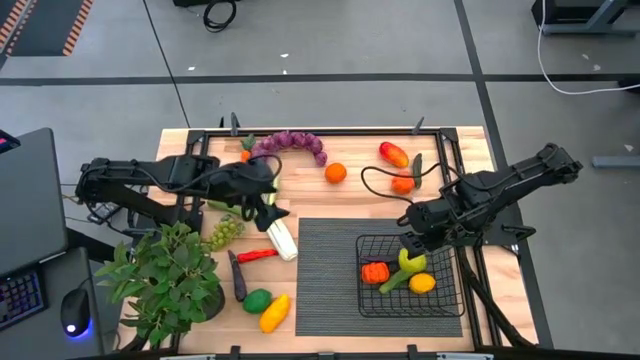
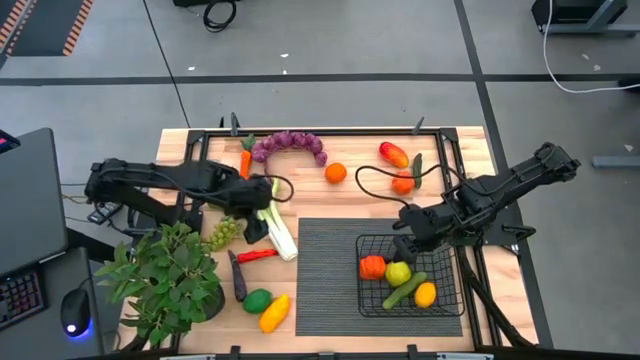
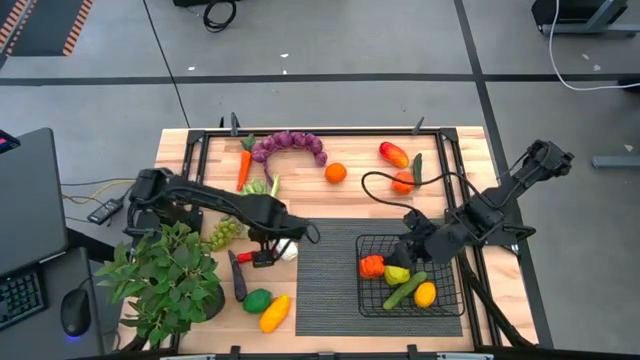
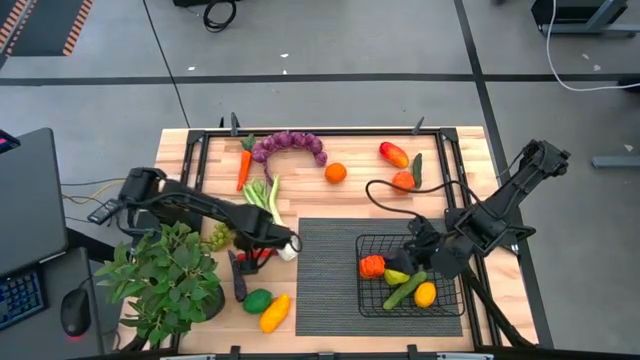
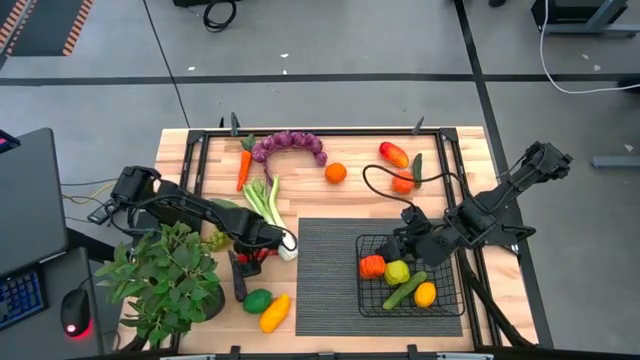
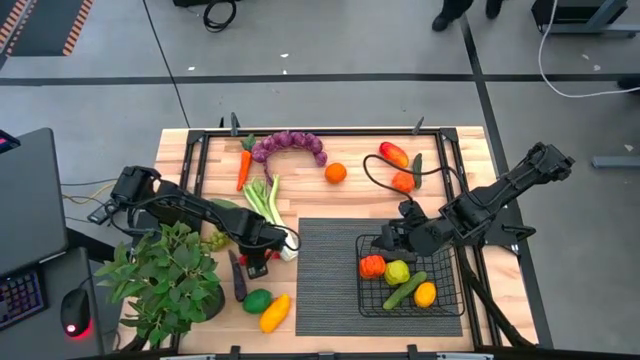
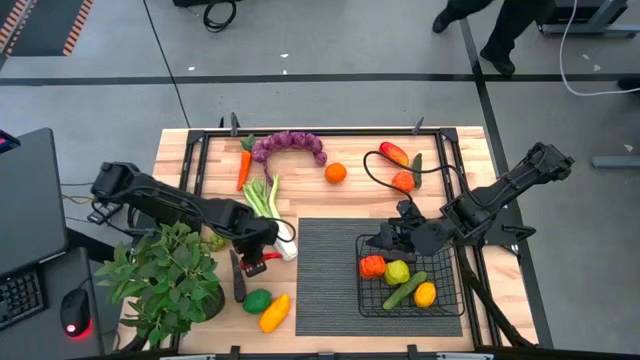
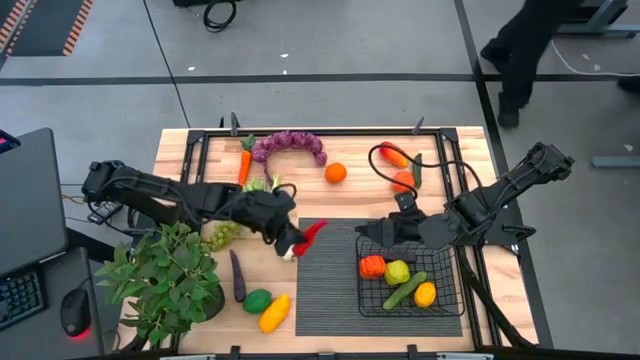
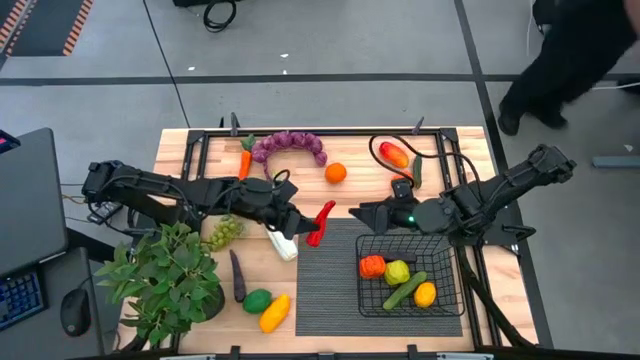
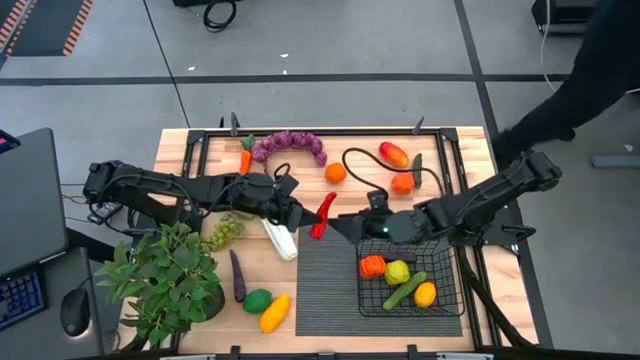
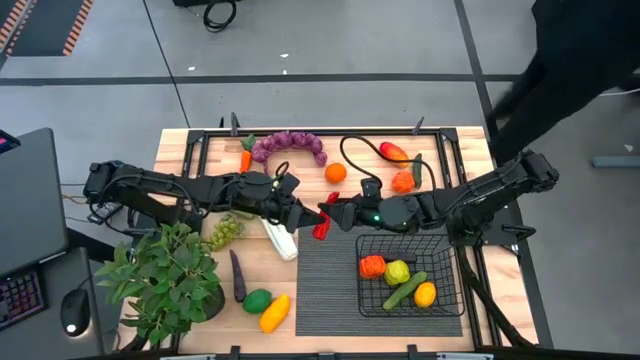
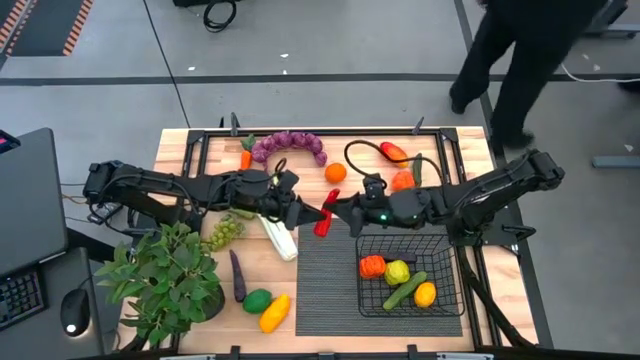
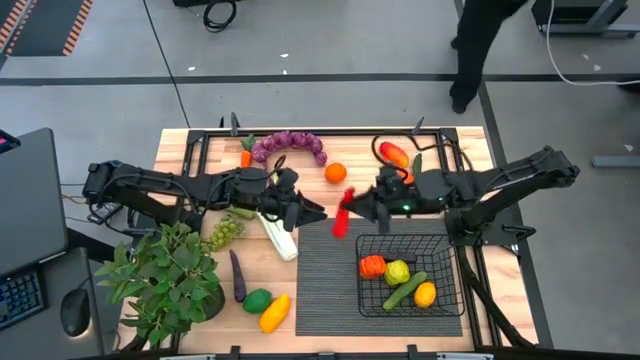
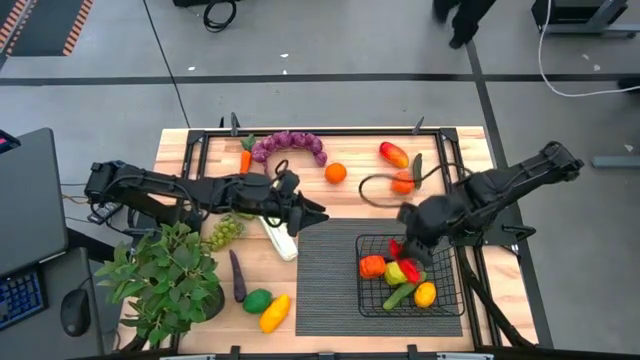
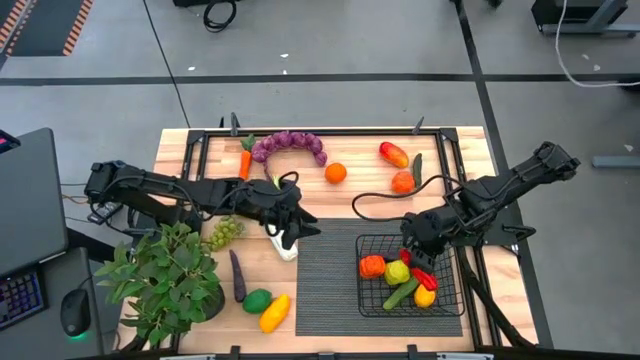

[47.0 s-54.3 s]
Task: Build produce basket
Put the red chili pepper into the wire basket

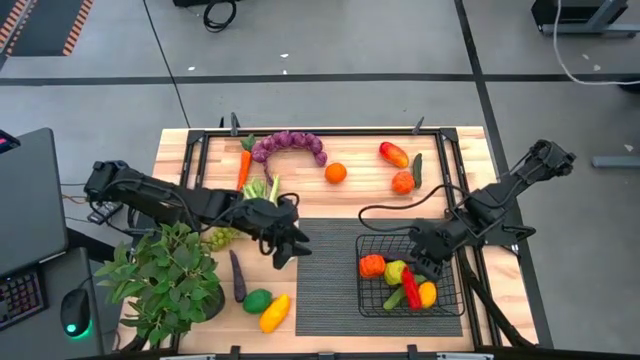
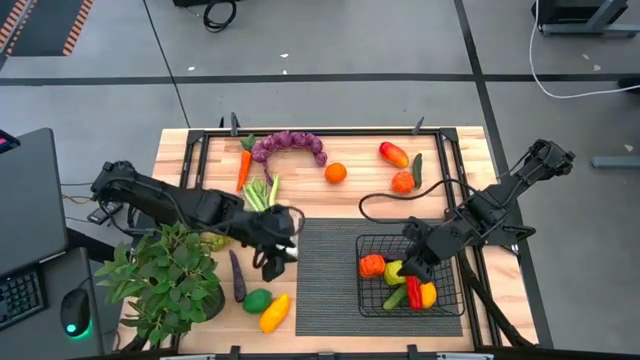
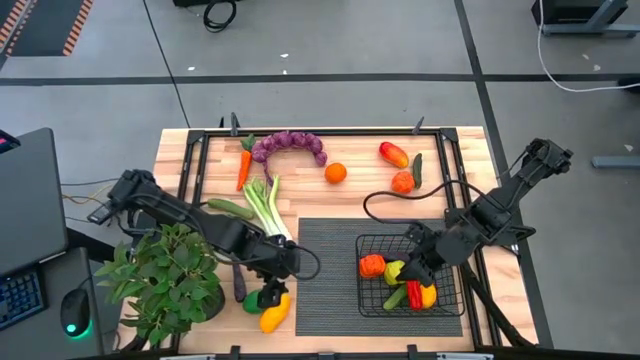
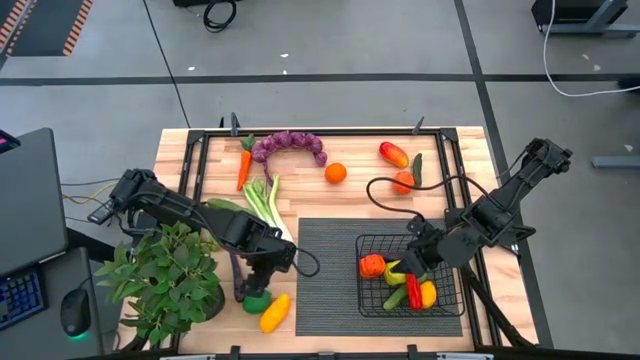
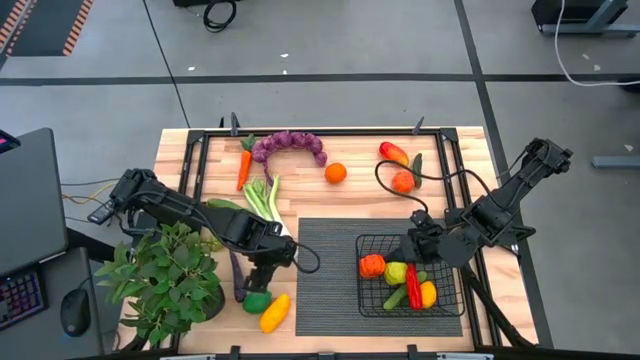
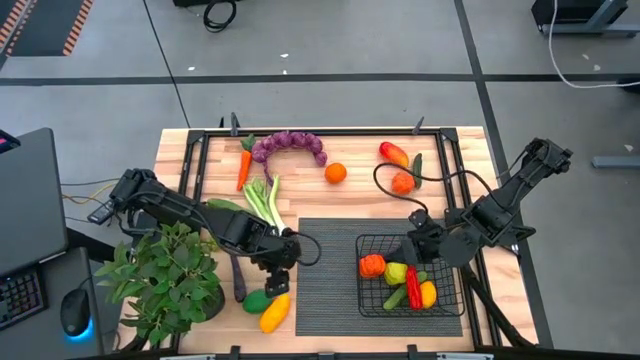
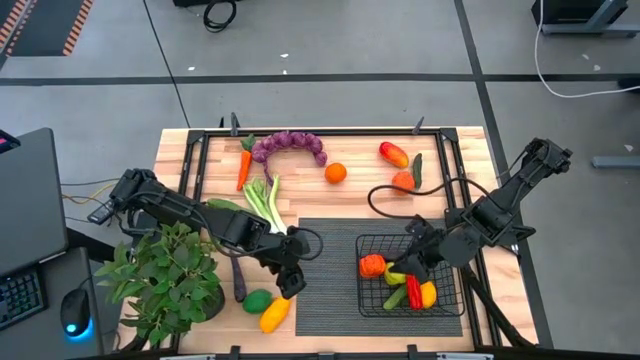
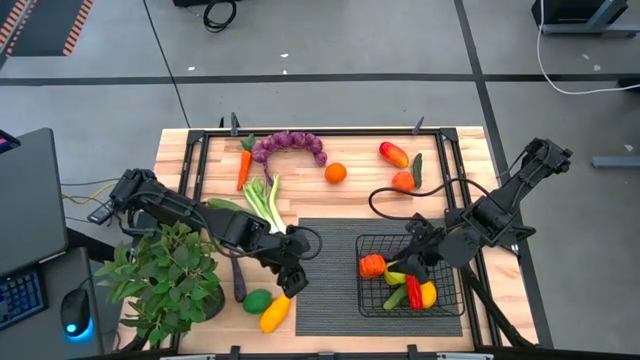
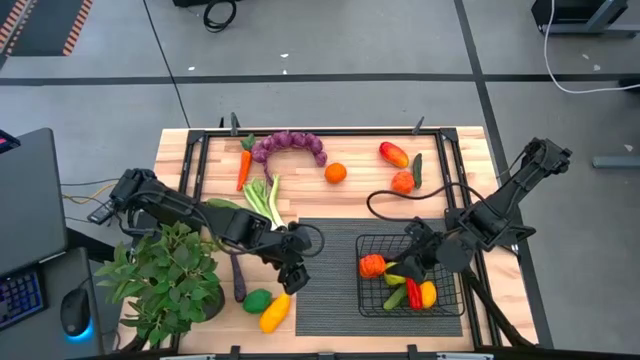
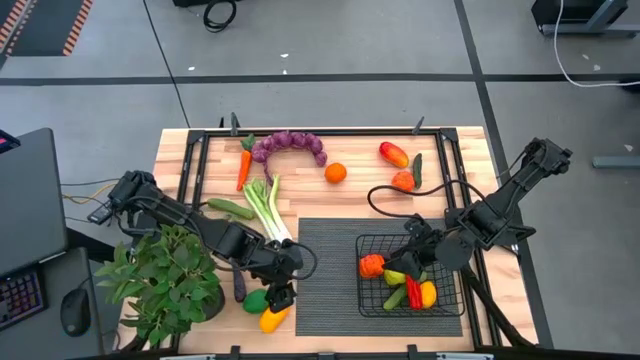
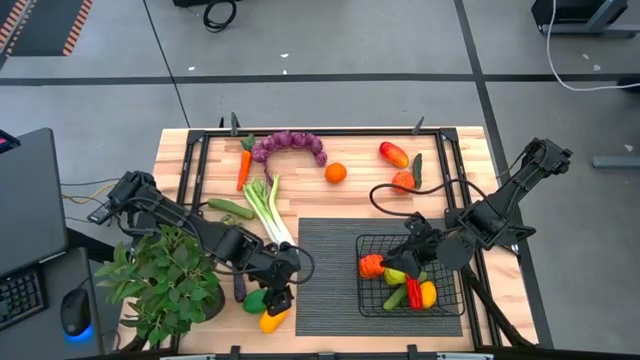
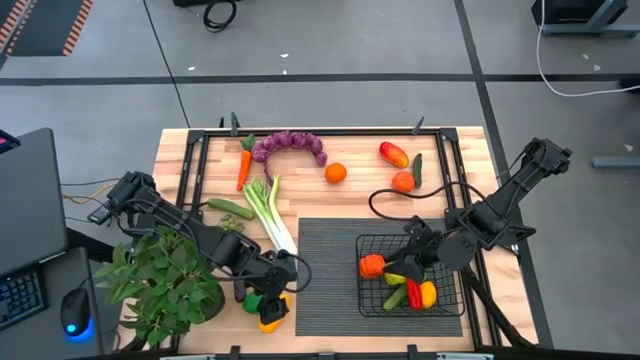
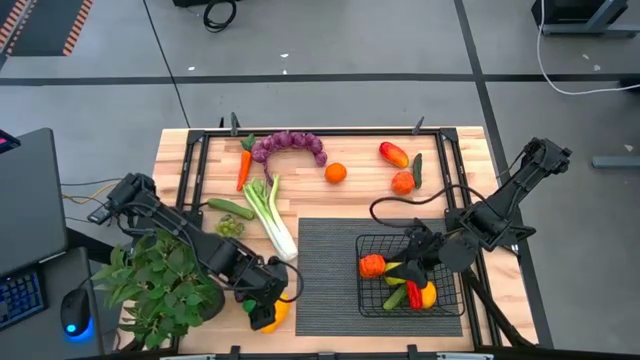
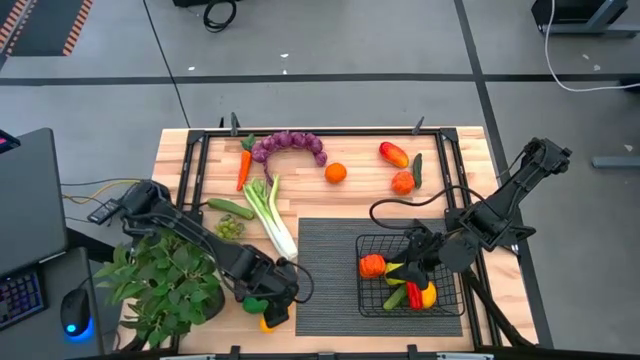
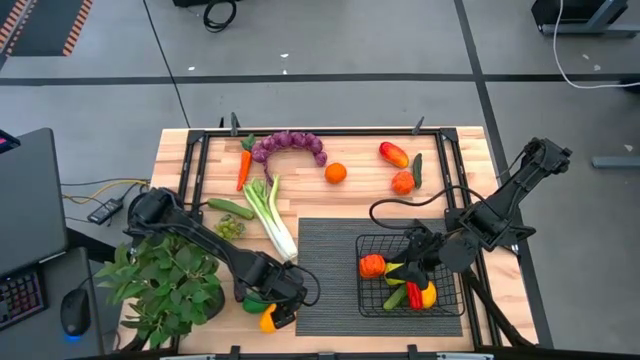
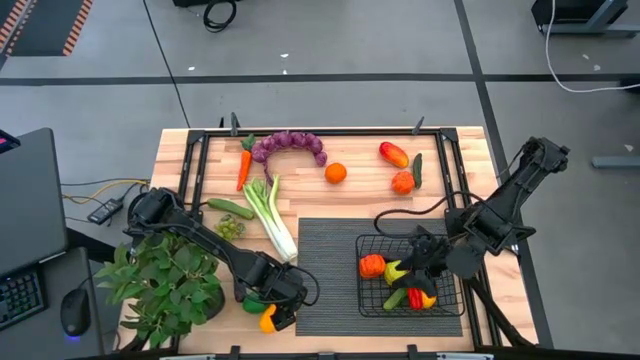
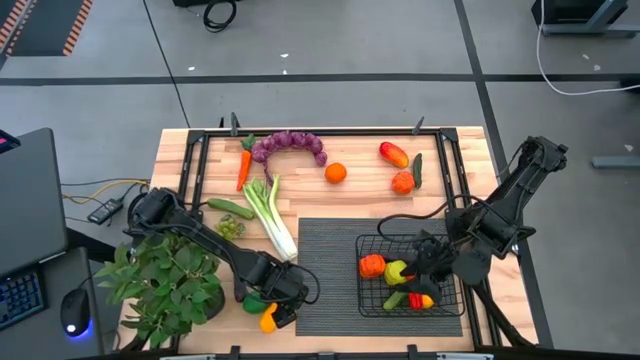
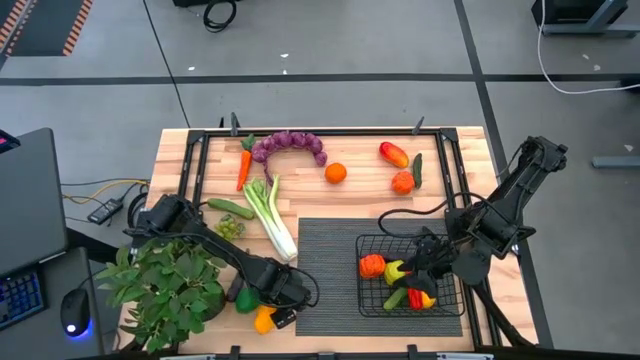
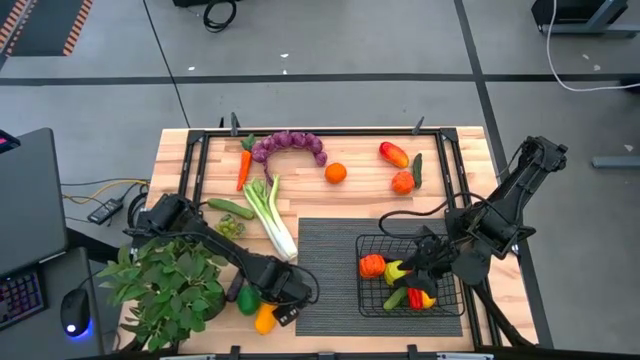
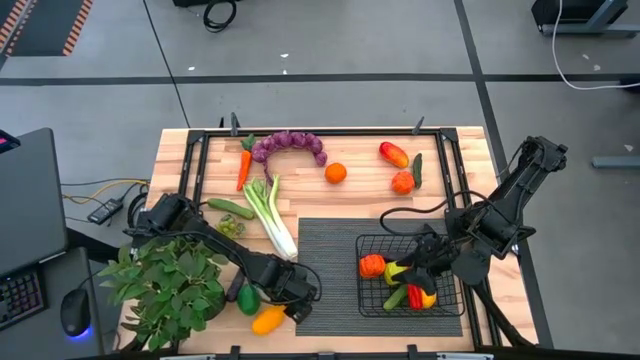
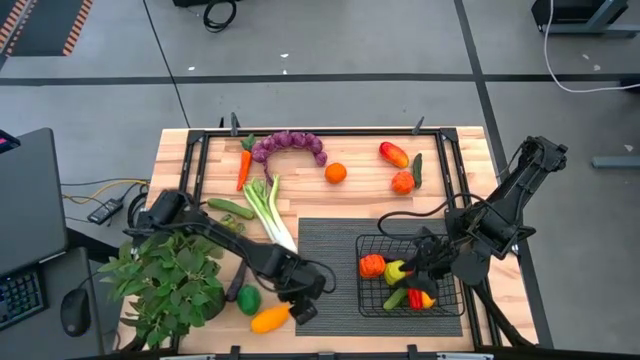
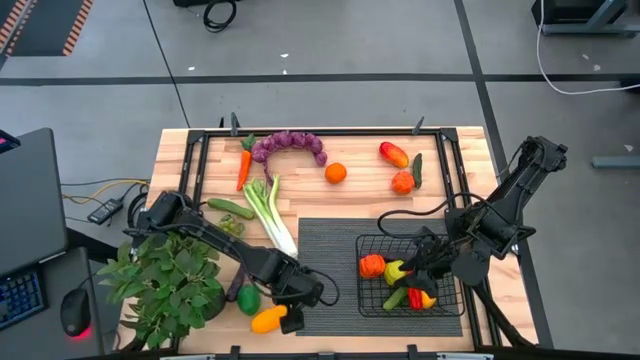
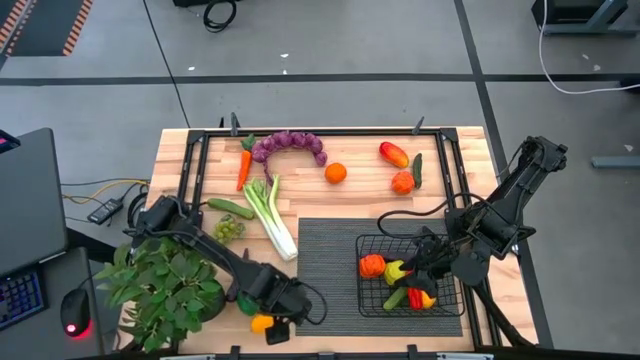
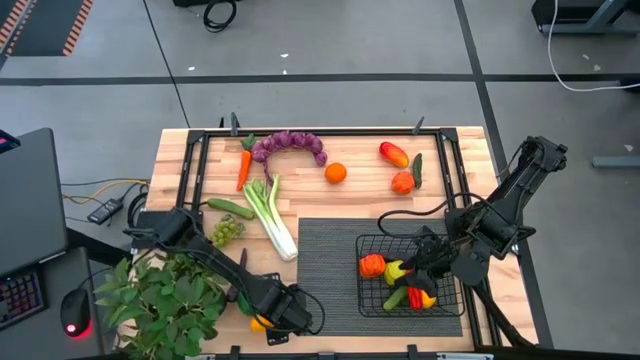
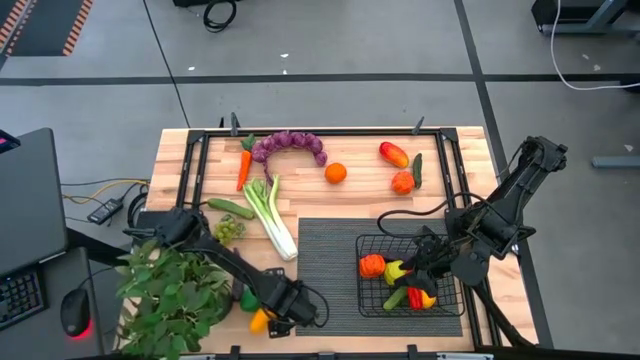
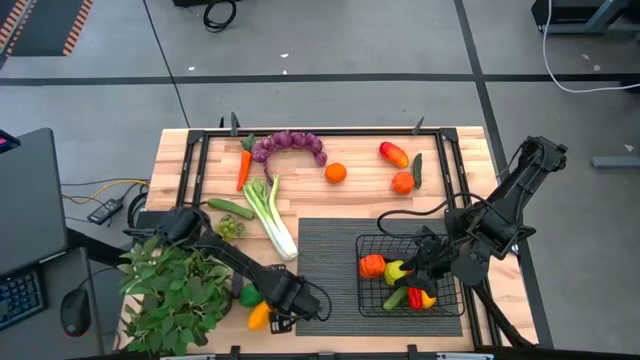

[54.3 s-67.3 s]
Put the bottom mango into the wire basket

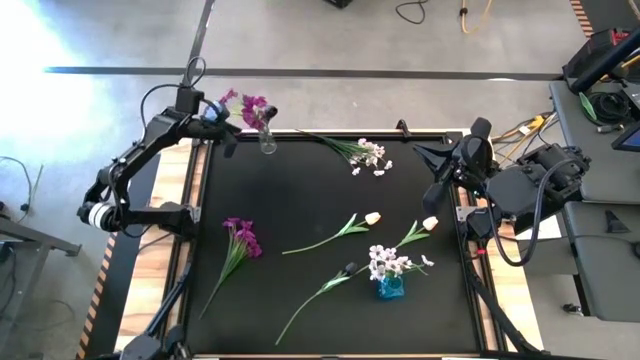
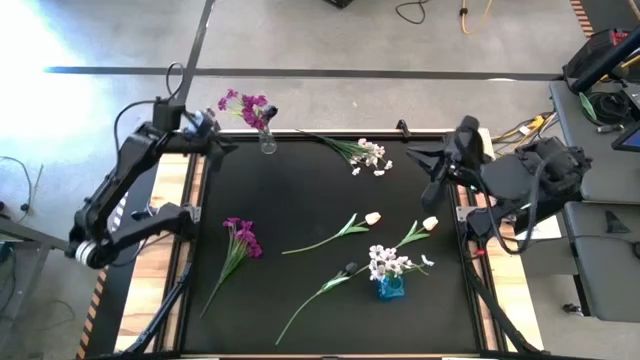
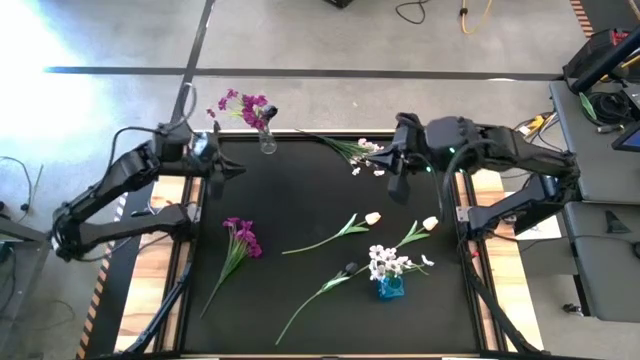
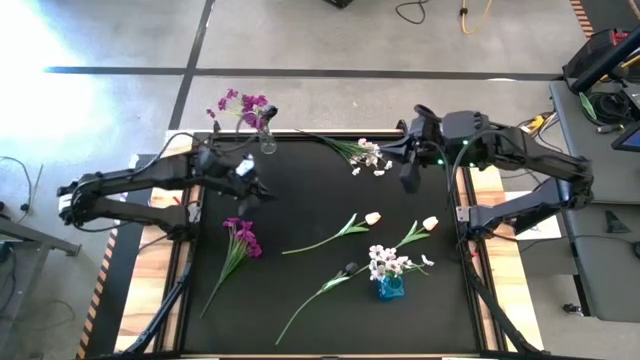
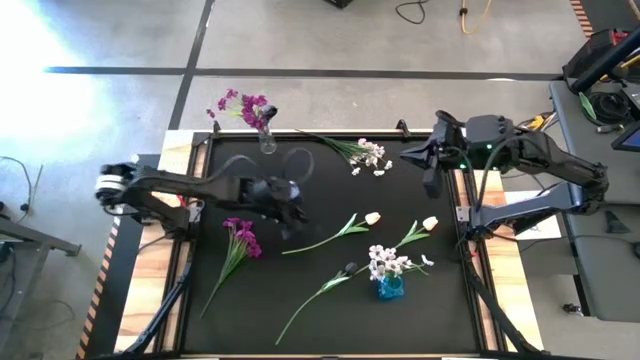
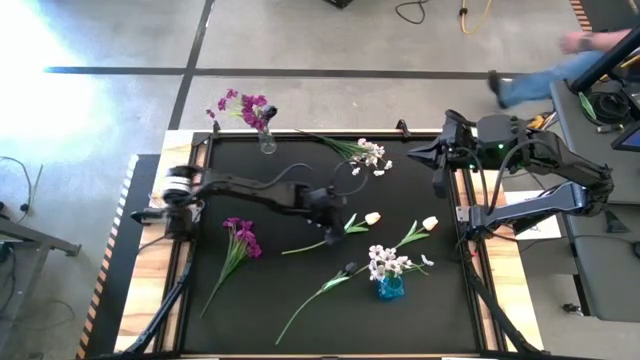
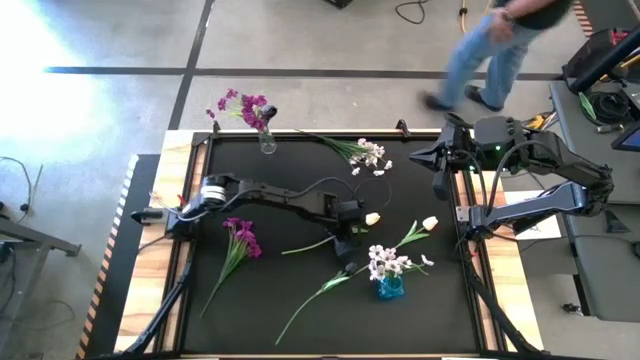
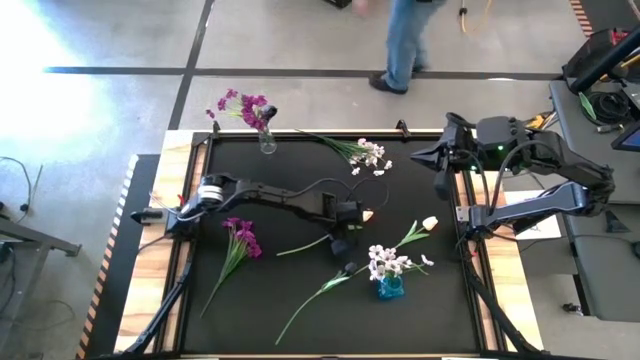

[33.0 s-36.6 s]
Task: Sort flowers into vase by color
Put the left white tulip into the blue vase
